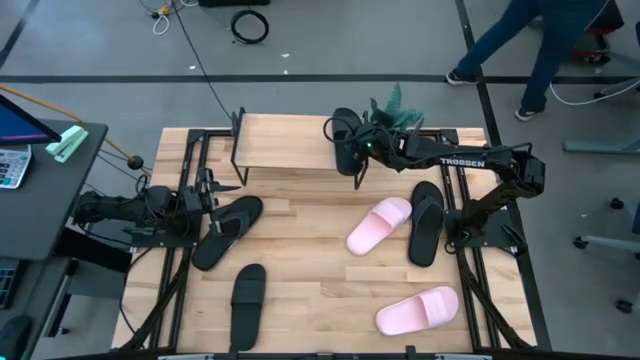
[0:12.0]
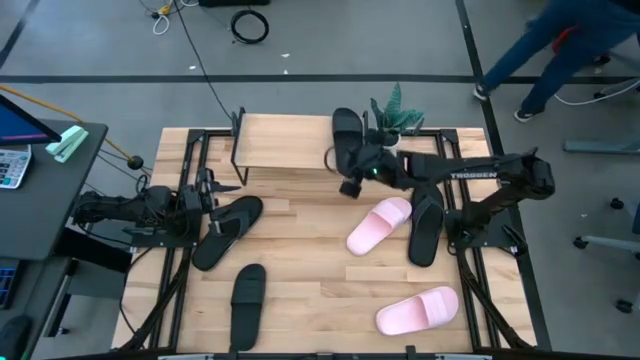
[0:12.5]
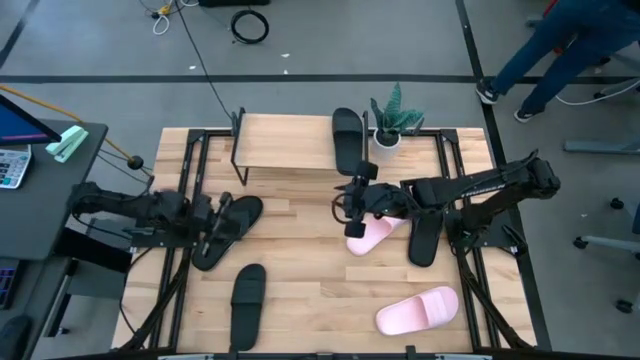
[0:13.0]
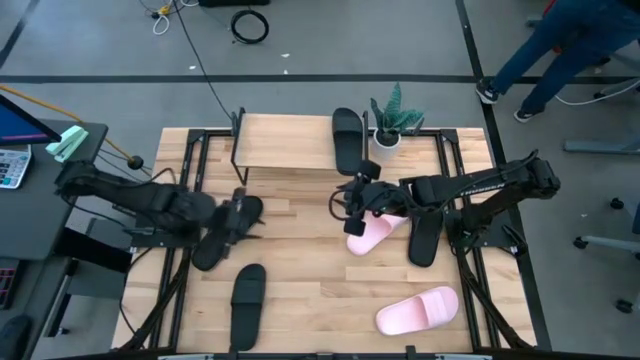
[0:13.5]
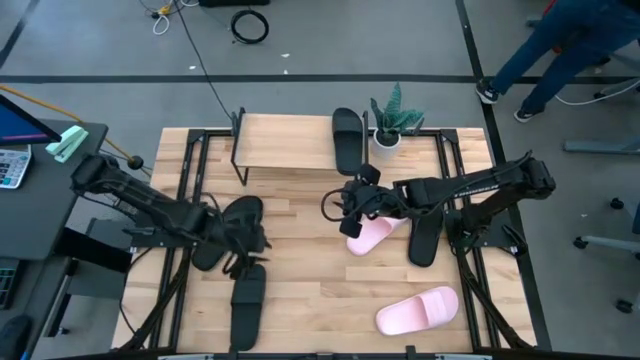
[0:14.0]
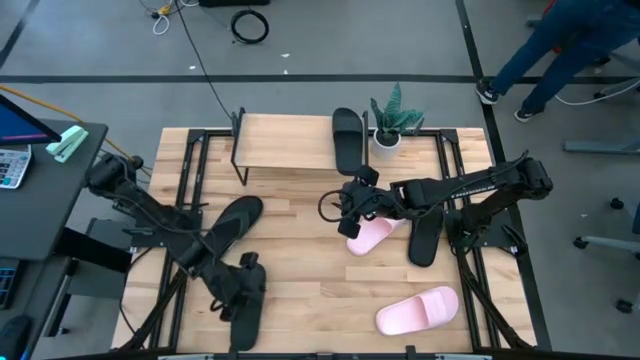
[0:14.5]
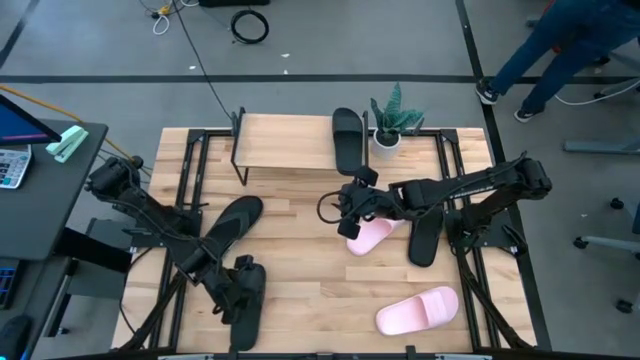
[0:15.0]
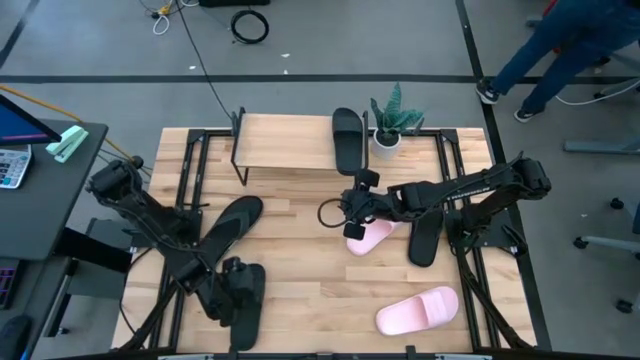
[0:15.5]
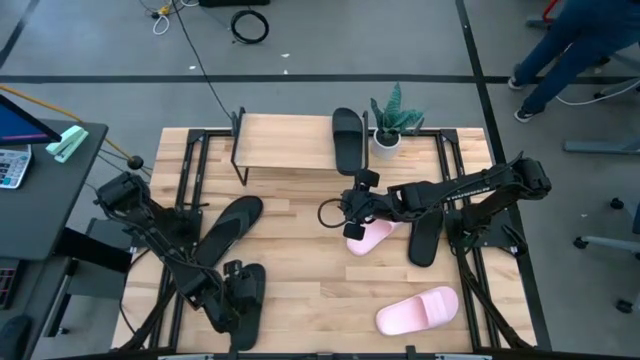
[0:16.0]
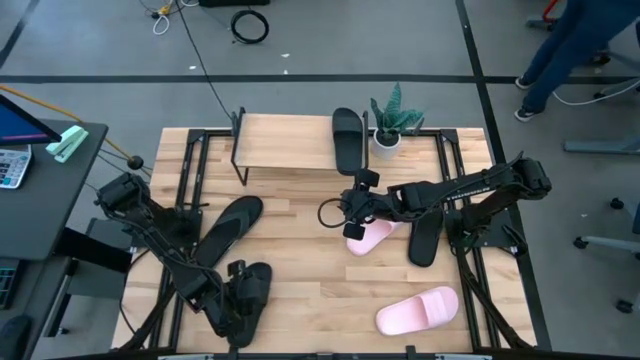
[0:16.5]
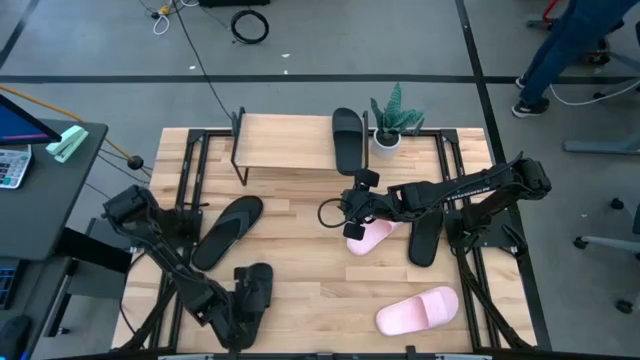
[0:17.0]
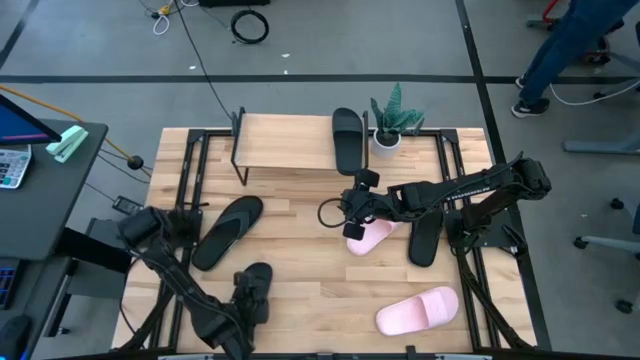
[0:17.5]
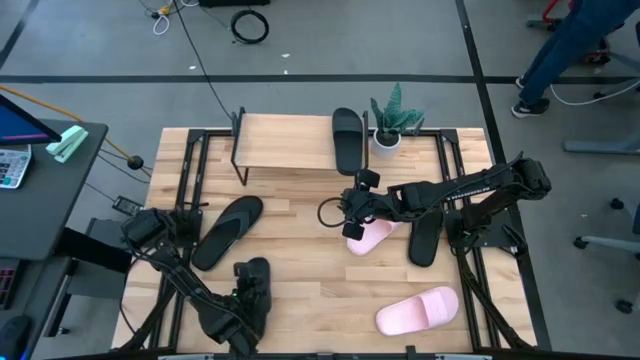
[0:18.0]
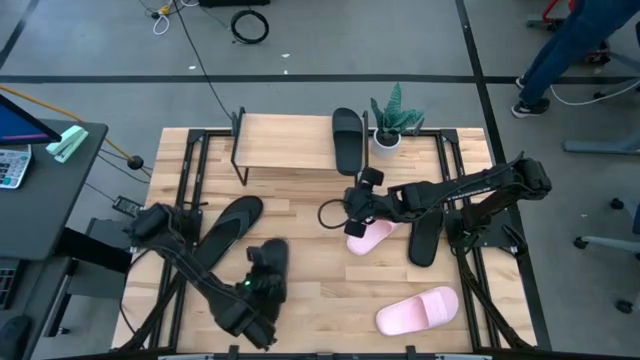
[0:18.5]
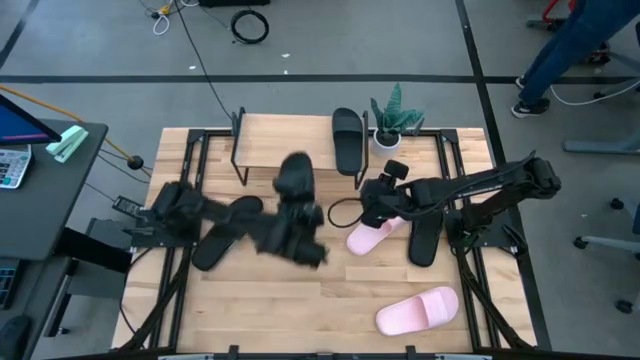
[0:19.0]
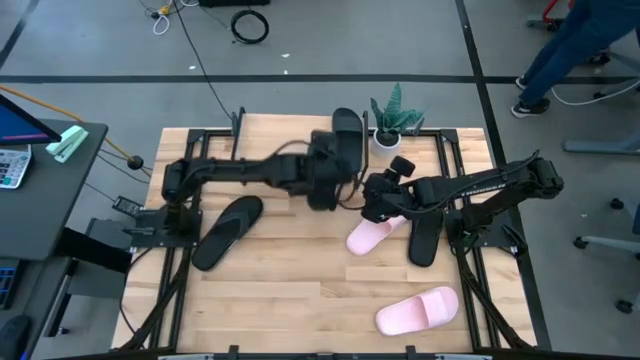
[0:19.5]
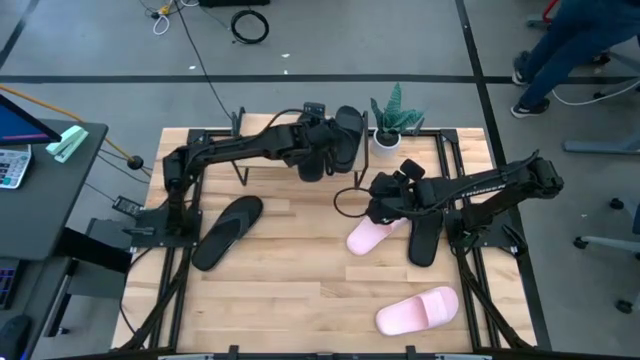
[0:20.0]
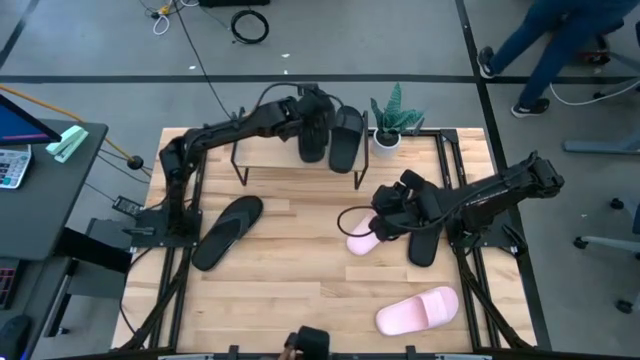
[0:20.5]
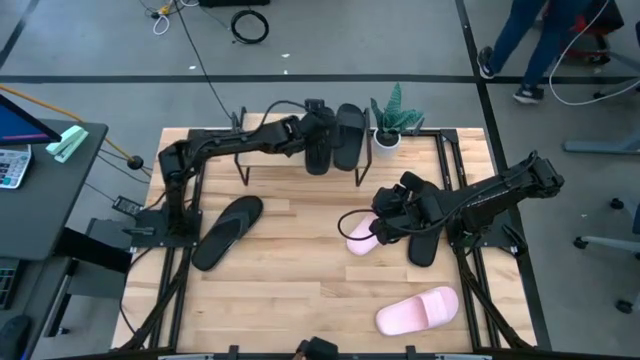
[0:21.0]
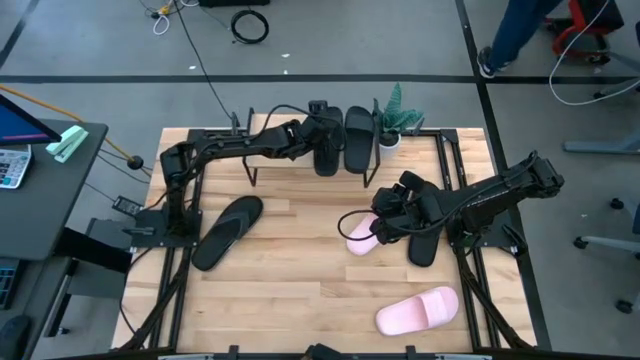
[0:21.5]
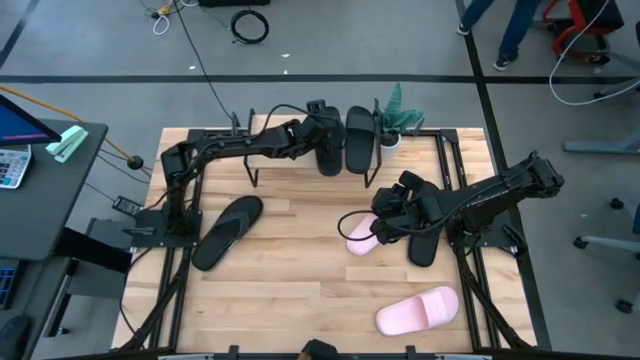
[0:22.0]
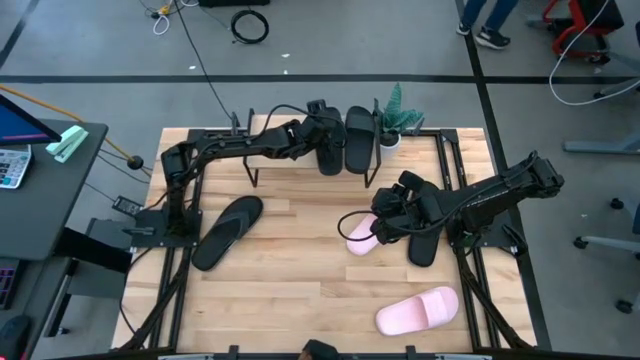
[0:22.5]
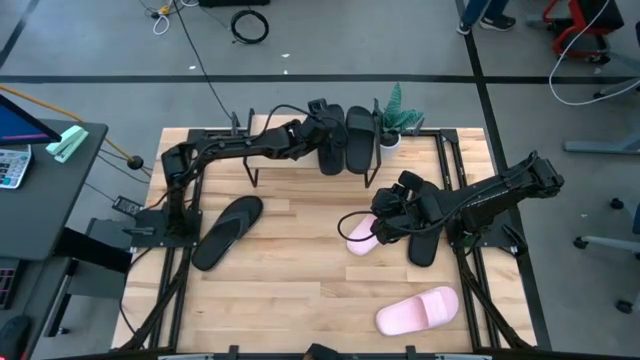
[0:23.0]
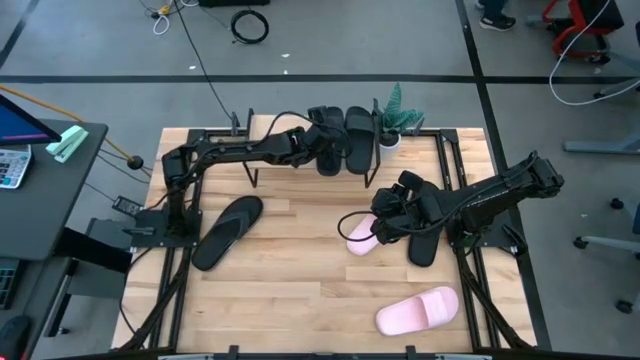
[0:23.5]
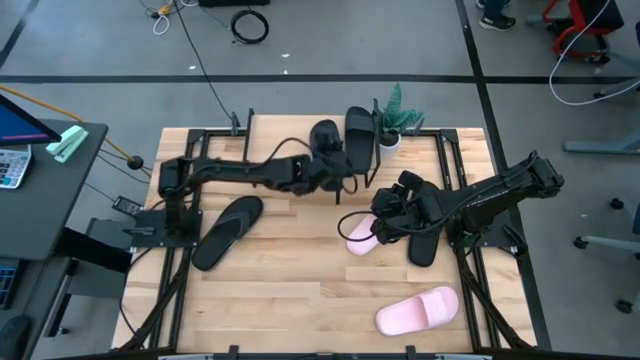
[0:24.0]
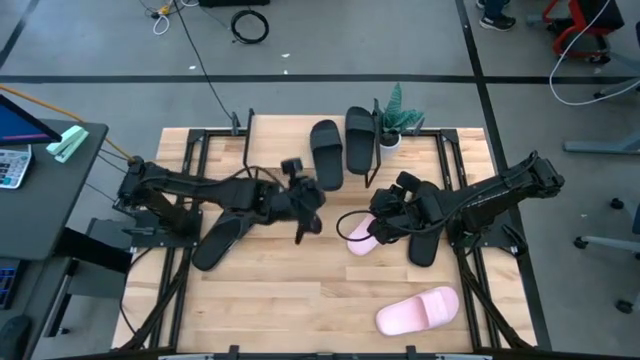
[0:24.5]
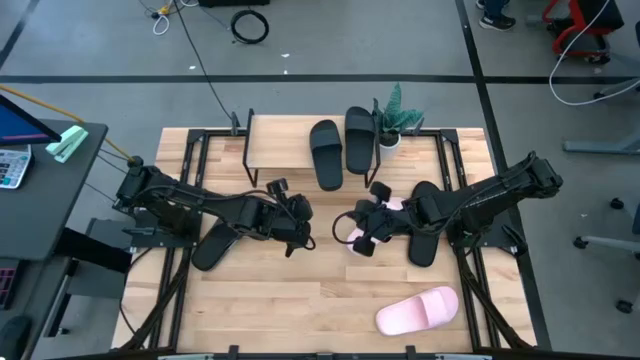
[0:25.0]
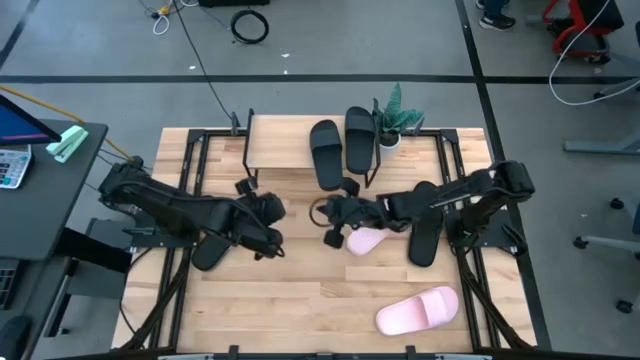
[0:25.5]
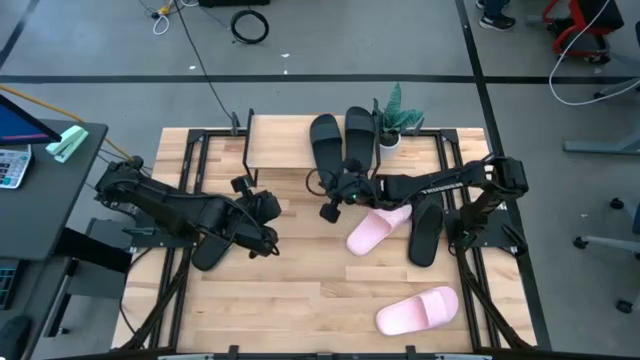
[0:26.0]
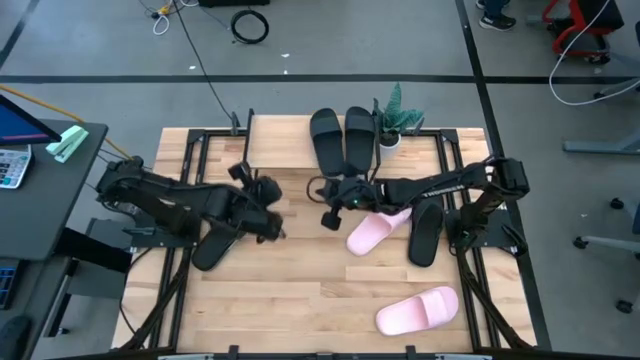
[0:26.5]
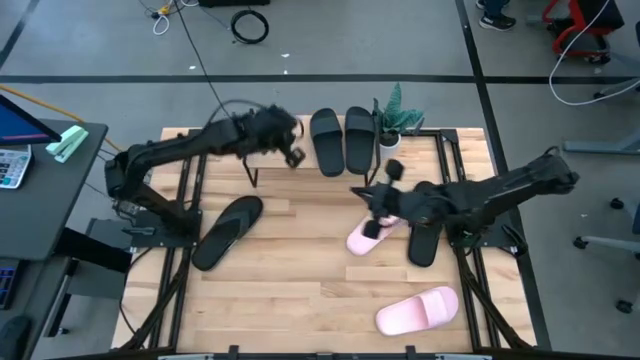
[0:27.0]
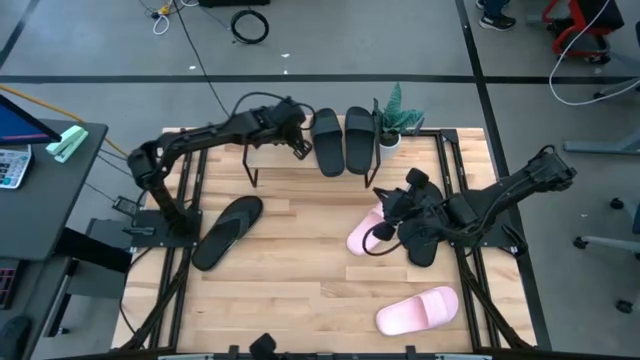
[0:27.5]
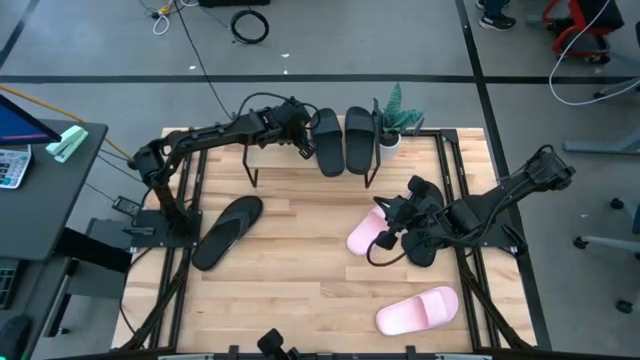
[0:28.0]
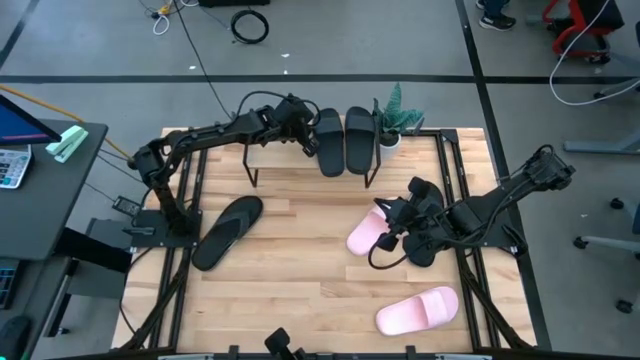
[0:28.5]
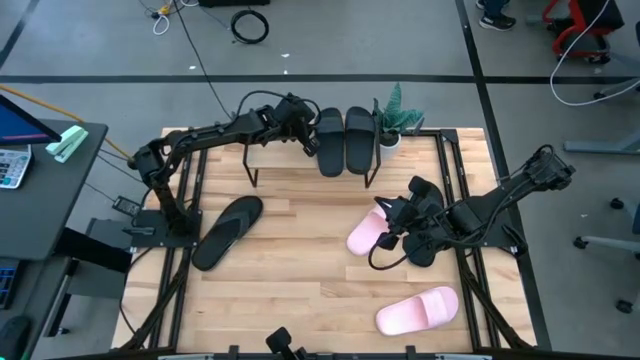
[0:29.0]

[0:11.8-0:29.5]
Task: Pick and place slides into the shelf
Put the bottom black slide on the shelf

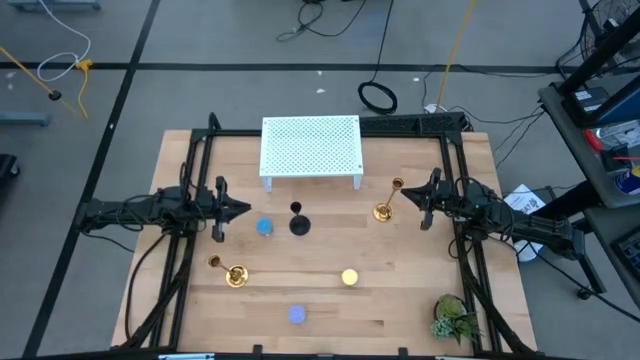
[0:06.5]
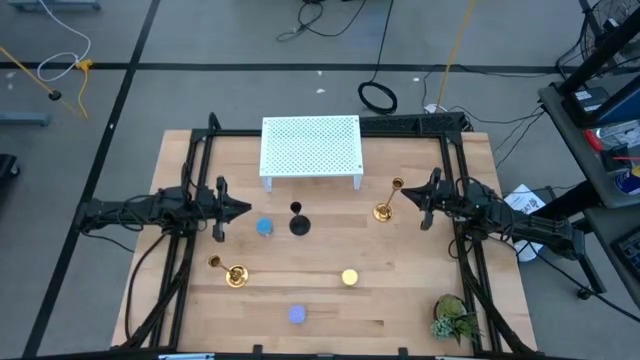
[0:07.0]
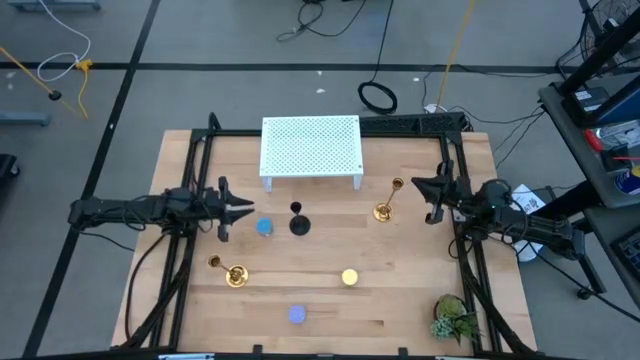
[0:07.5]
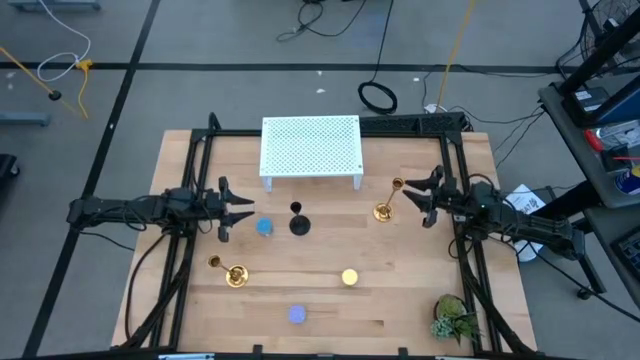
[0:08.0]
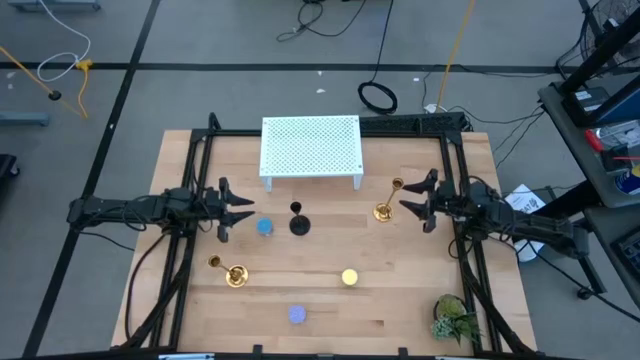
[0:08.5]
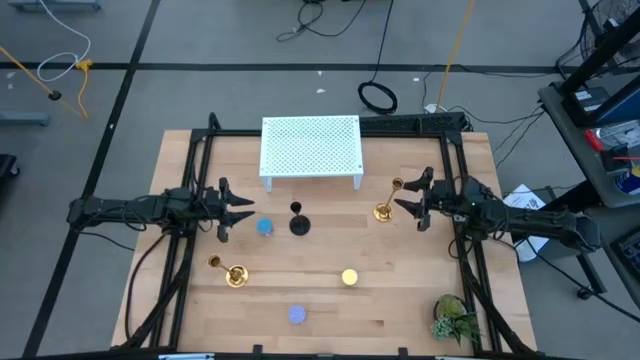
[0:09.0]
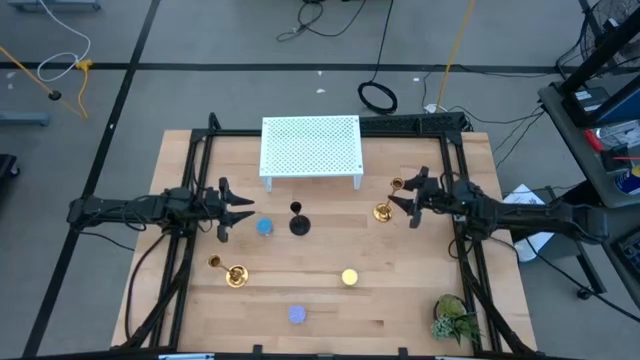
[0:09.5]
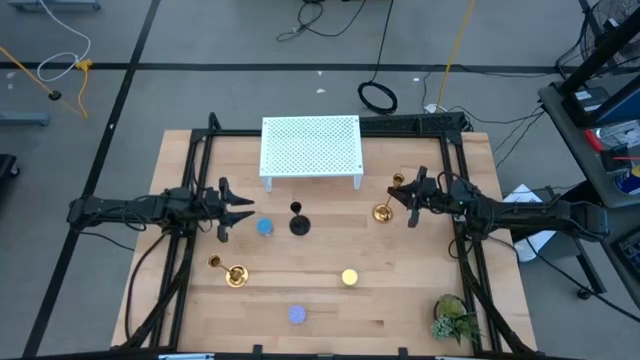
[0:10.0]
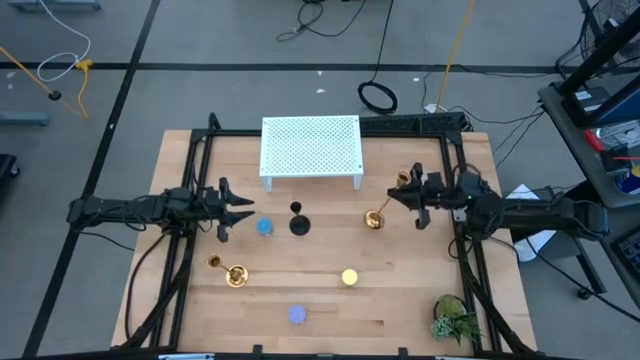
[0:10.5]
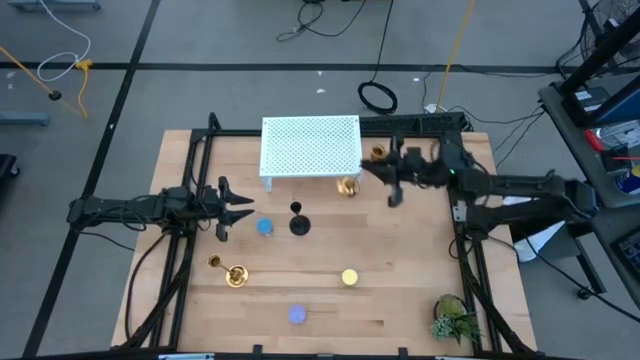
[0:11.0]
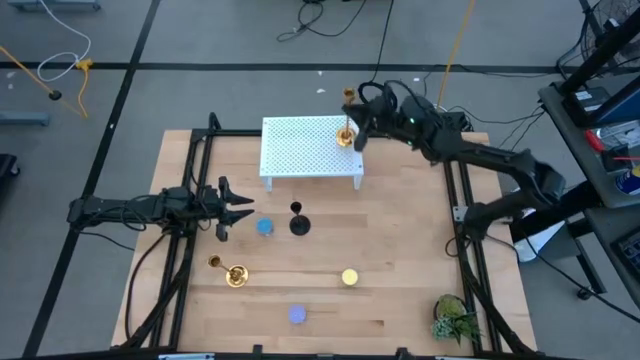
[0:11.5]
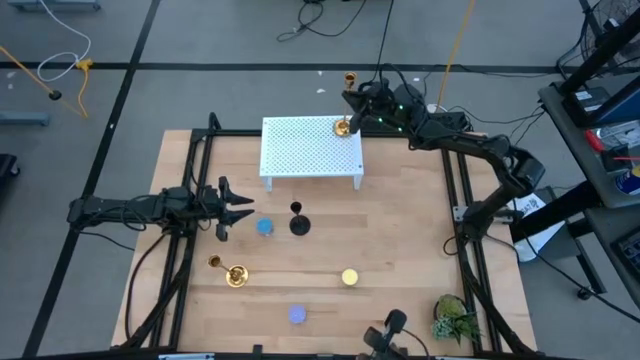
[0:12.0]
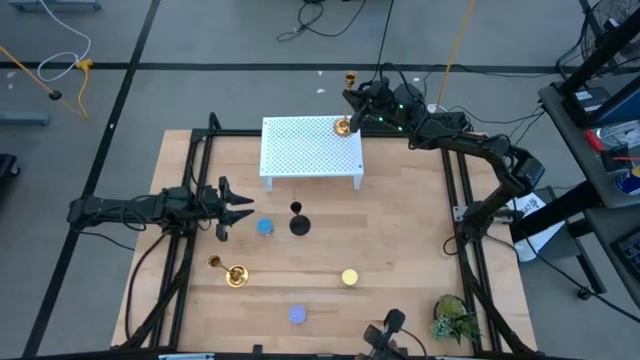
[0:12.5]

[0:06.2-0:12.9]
Task: Pick & Place candle stick holders
Put the left golden candle holder on the shelf
